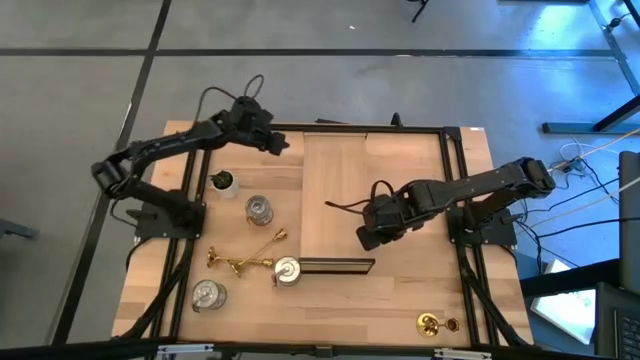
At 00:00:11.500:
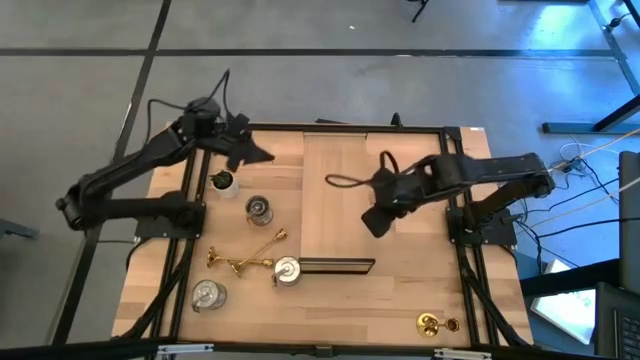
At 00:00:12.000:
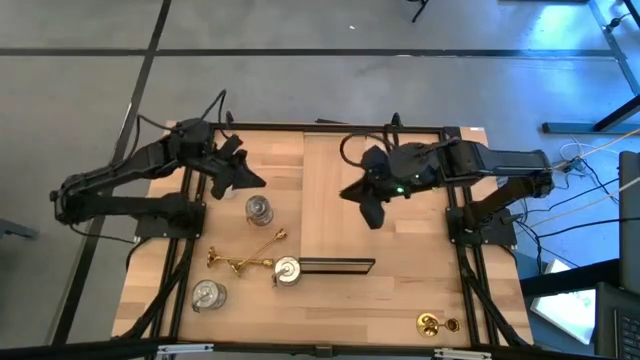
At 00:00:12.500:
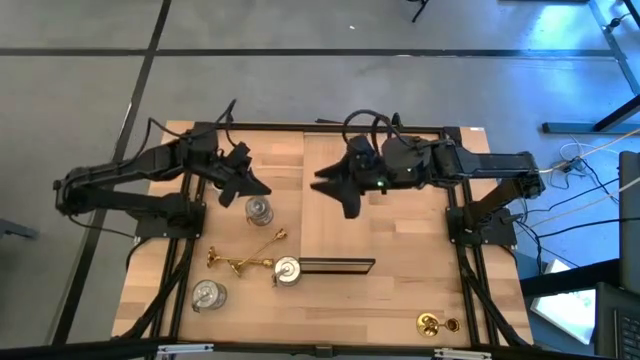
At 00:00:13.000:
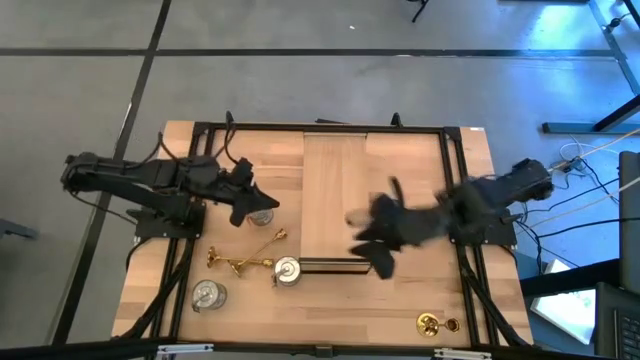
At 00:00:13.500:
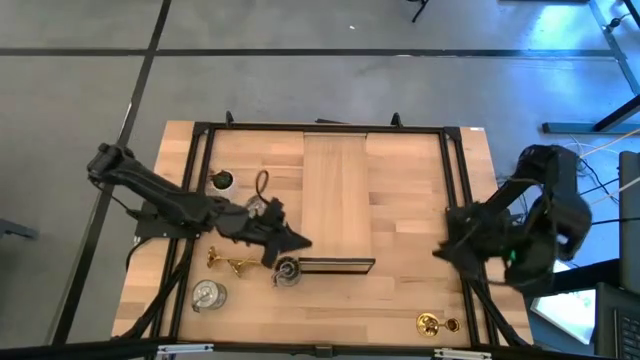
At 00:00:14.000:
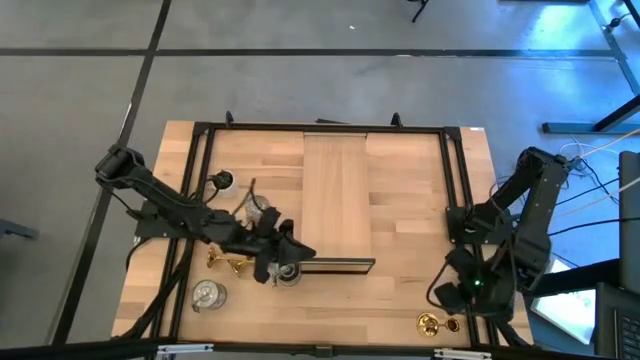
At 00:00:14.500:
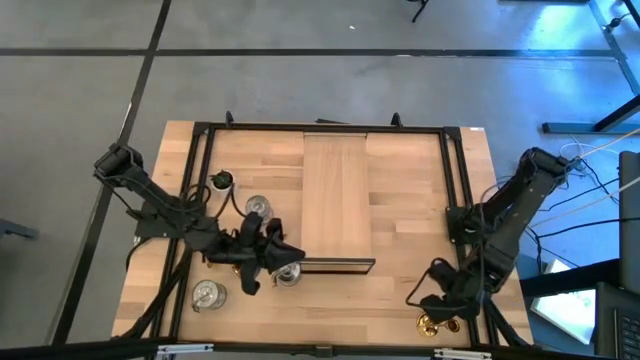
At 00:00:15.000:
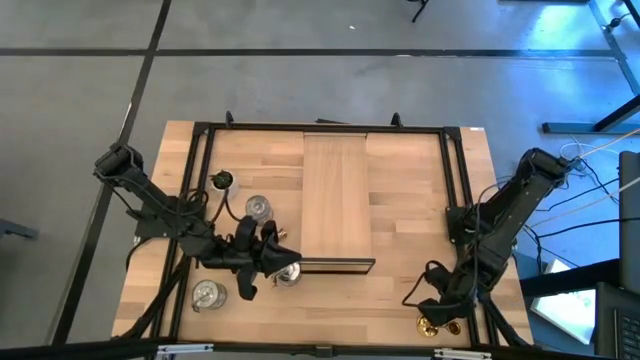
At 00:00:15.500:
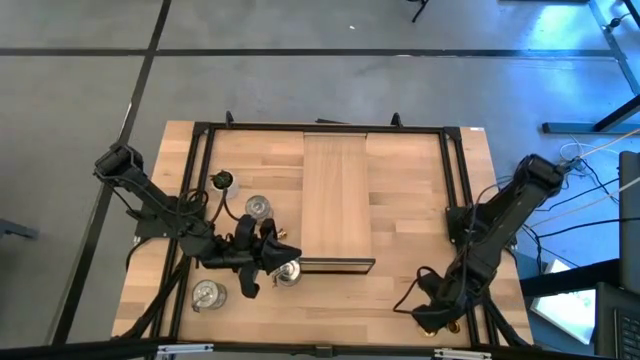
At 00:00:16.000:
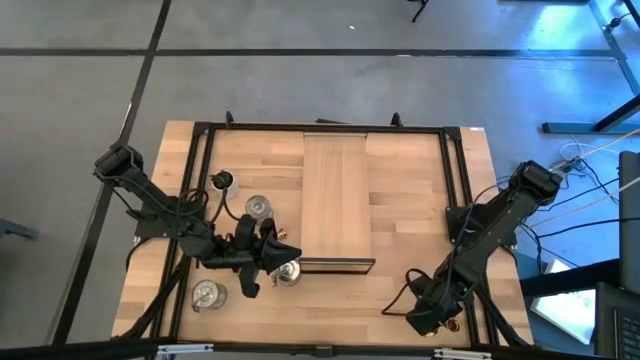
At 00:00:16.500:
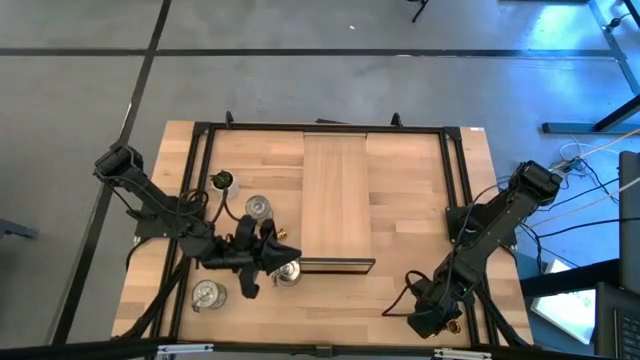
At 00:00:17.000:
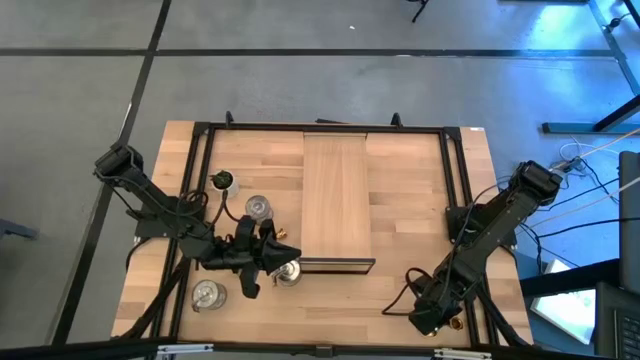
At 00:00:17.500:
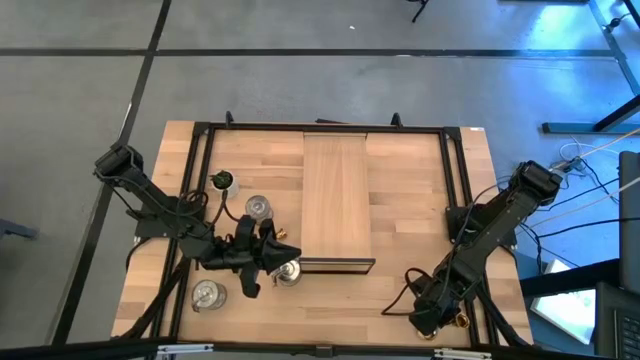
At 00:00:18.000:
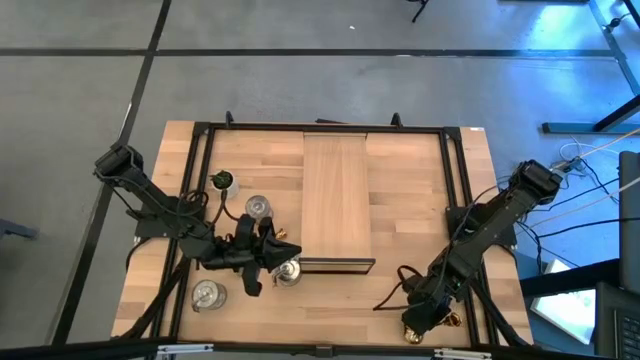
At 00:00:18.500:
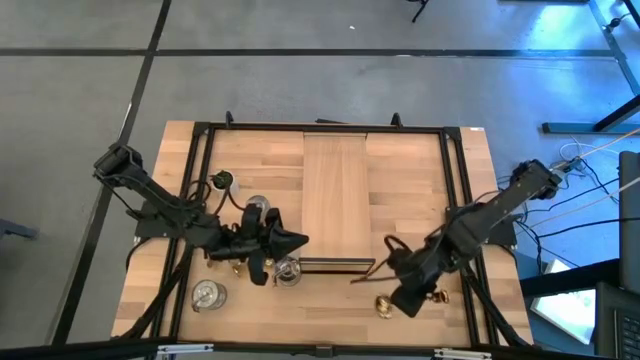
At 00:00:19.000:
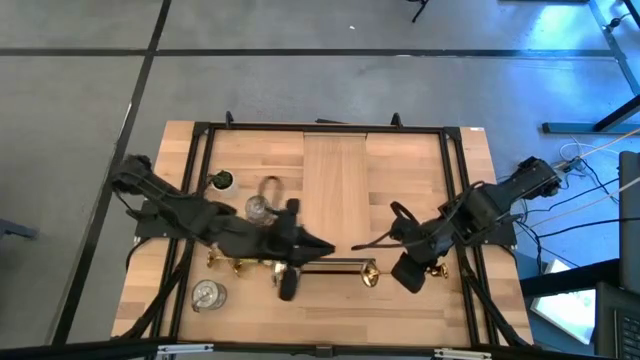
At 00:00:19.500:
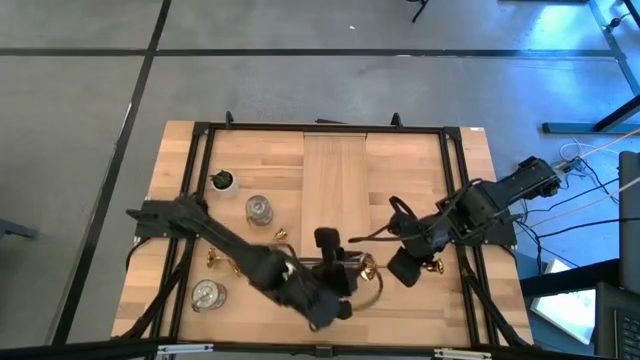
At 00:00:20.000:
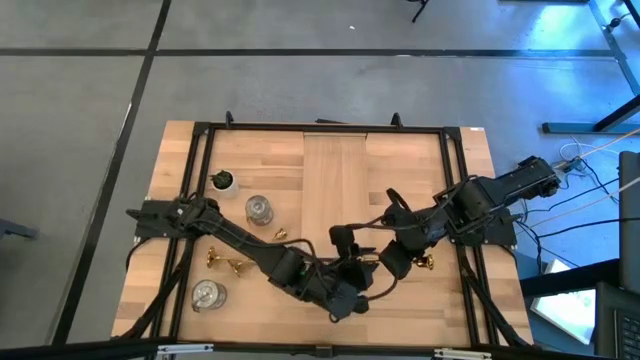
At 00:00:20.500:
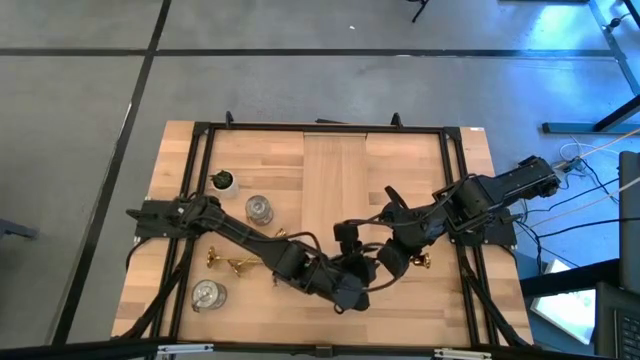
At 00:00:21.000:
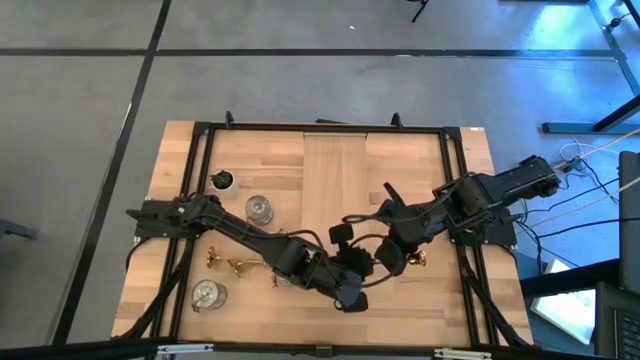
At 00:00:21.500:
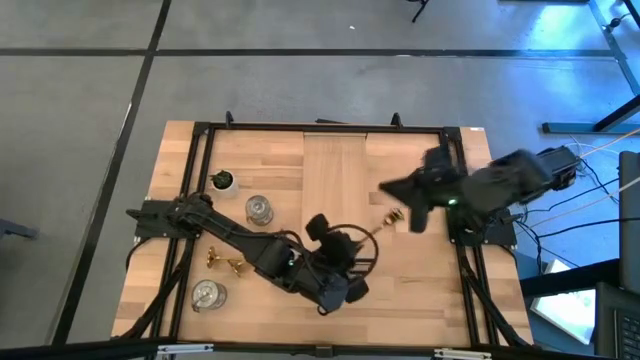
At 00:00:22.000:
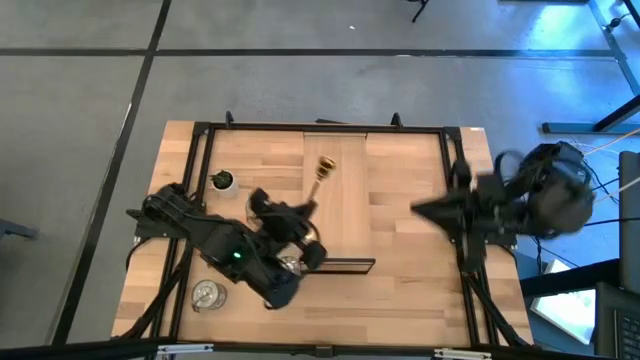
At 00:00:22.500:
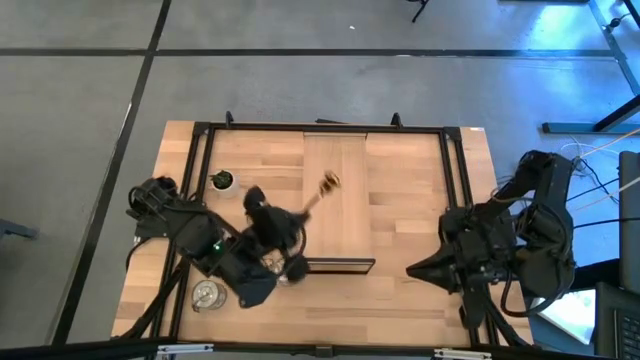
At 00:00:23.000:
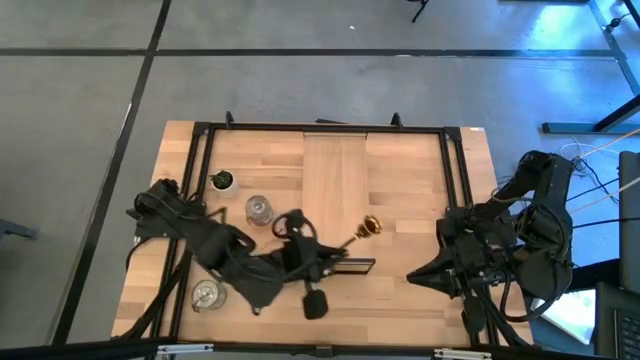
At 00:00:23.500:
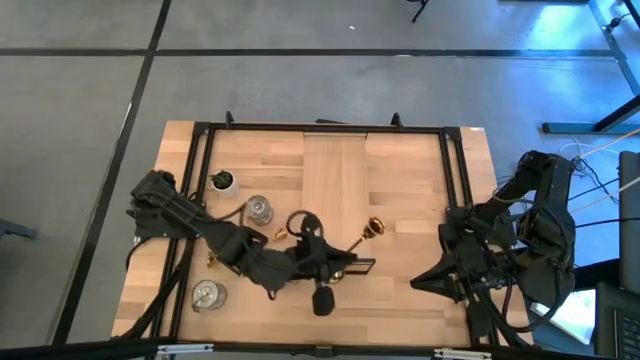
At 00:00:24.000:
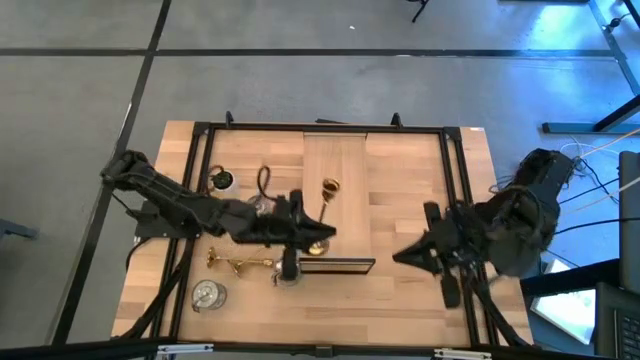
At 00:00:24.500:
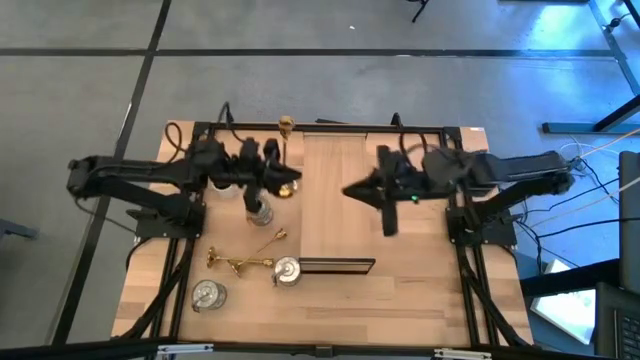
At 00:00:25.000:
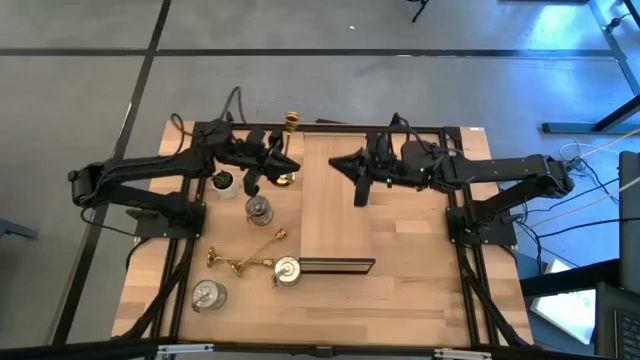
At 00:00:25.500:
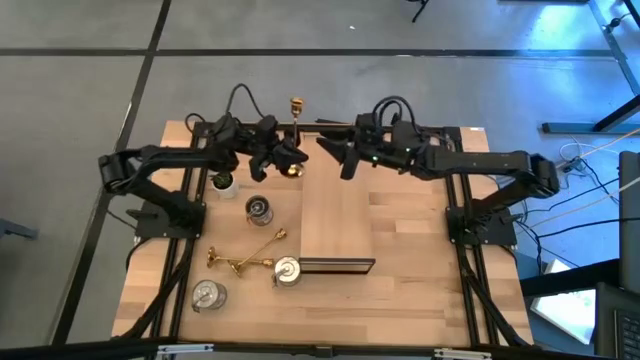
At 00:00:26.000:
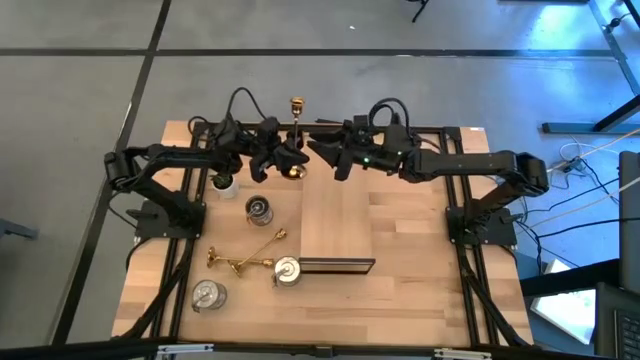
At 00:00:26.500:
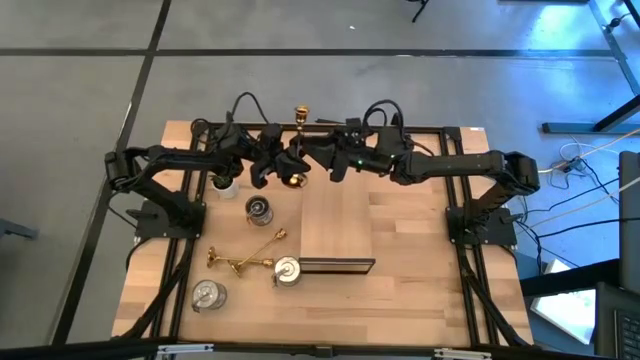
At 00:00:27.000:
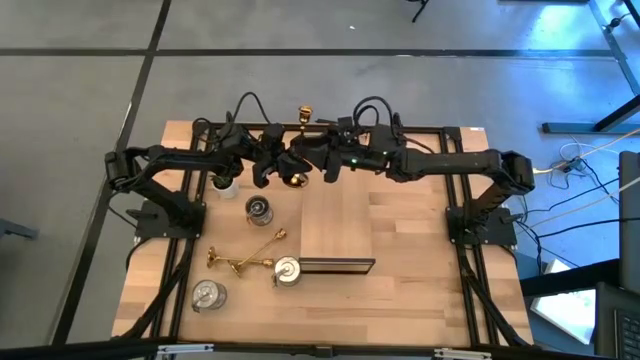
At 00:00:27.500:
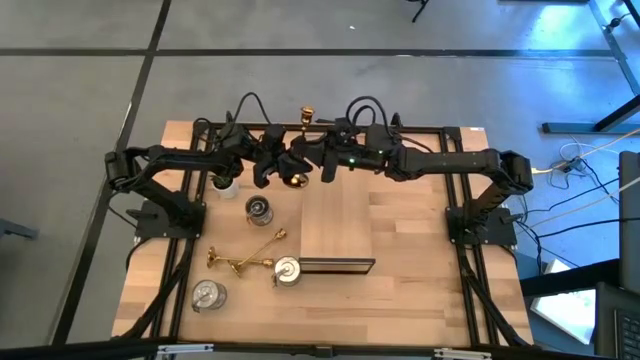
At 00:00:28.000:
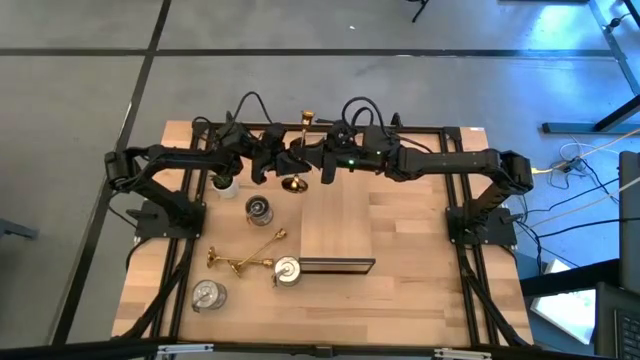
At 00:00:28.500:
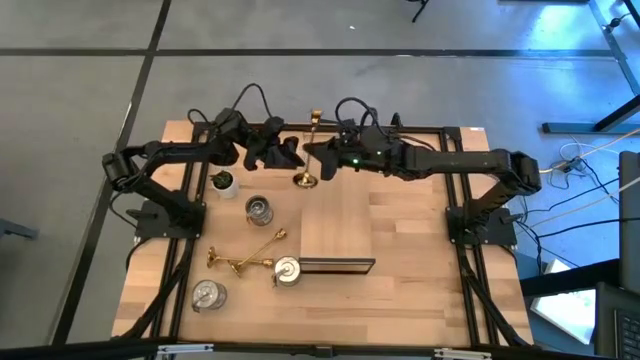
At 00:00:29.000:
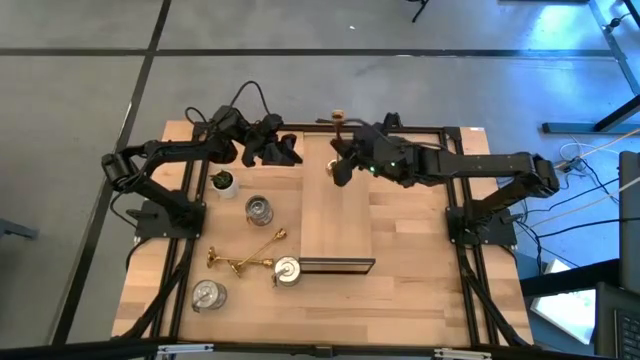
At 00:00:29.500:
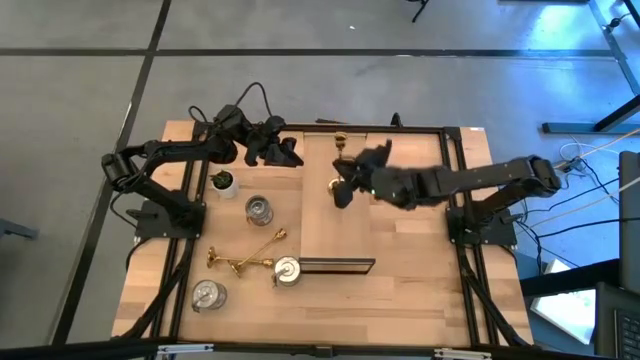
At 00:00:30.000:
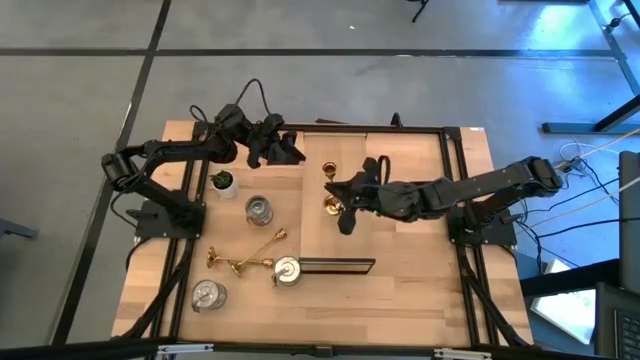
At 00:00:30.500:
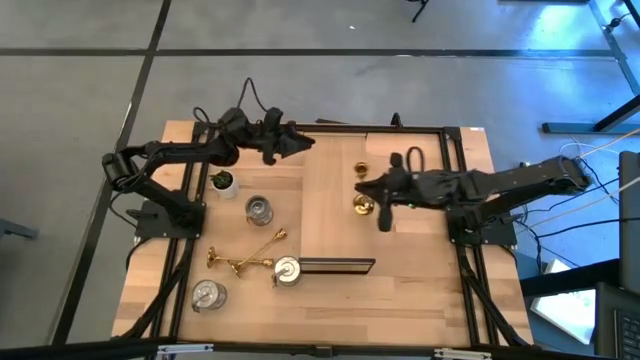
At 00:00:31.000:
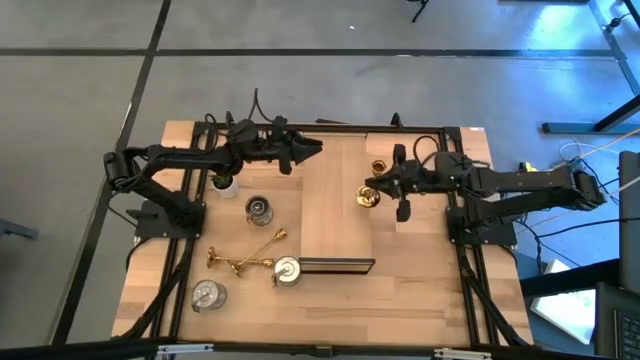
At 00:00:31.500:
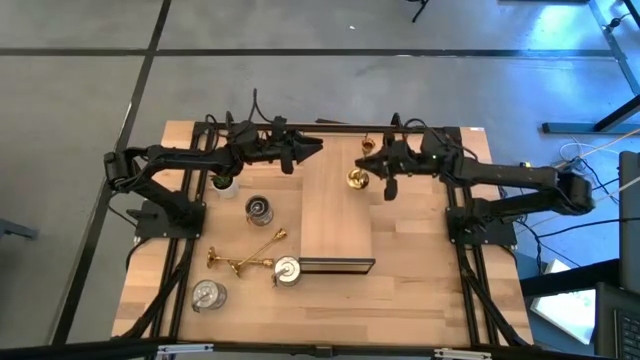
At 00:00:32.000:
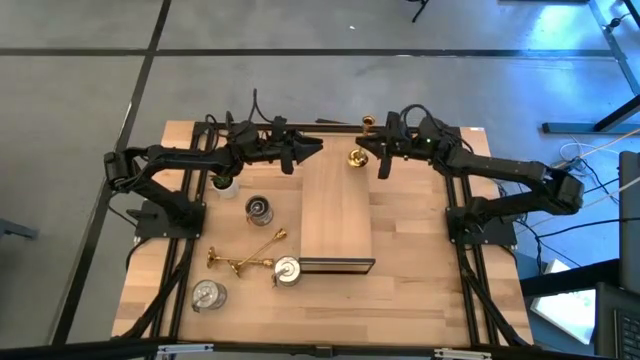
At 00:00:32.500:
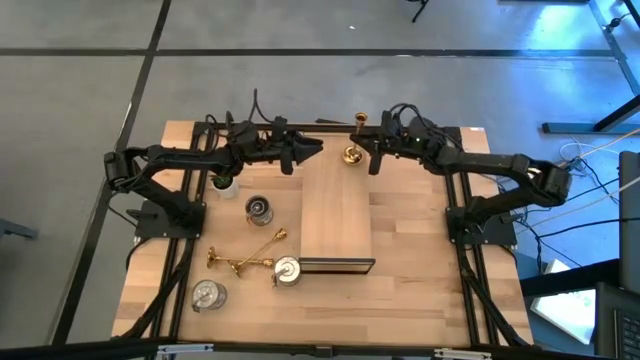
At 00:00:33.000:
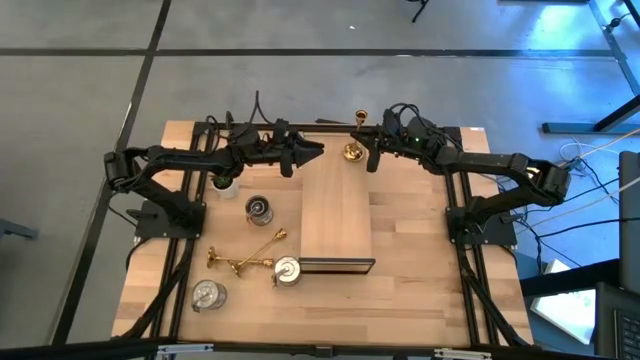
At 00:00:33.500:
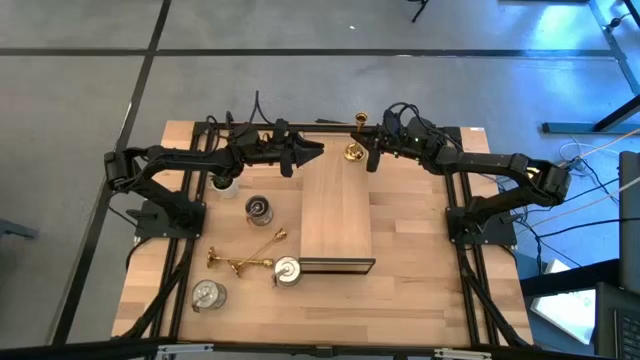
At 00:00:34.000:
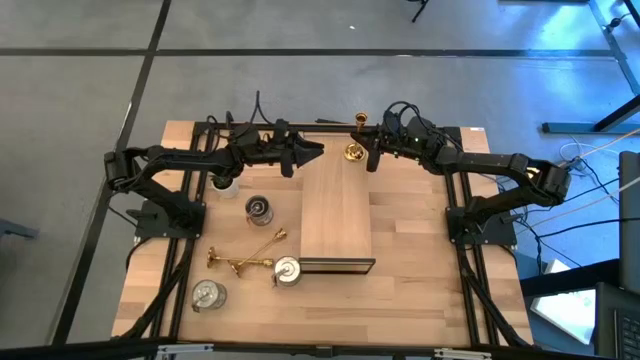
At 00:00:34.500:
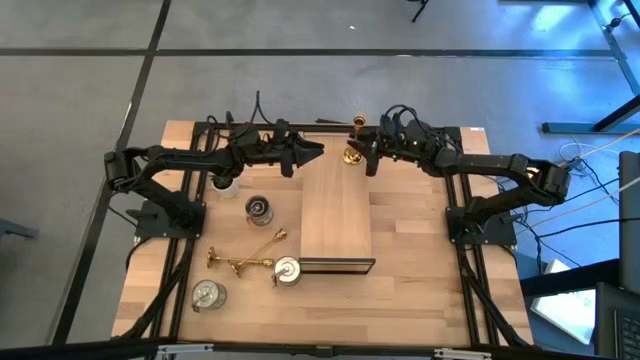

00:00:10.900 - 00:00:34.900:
Task: Pick & Place candle stick holders
Put the bottom right gold candle holder on the shelf
